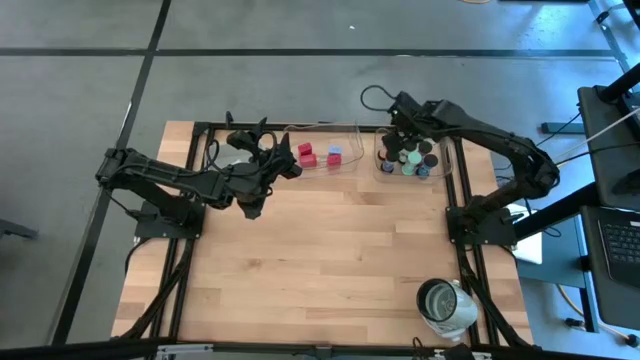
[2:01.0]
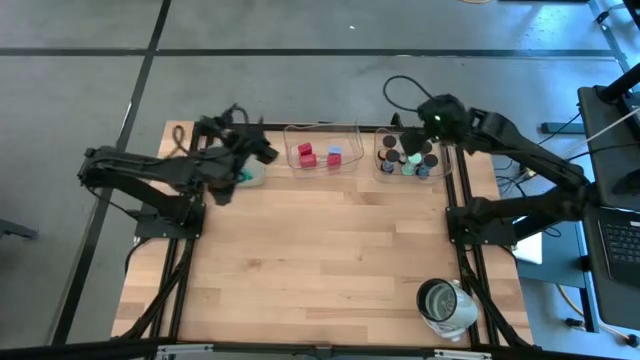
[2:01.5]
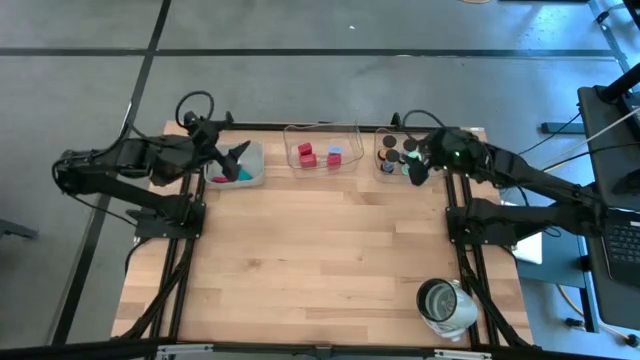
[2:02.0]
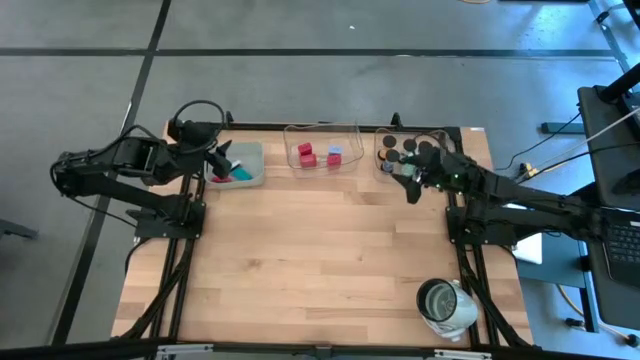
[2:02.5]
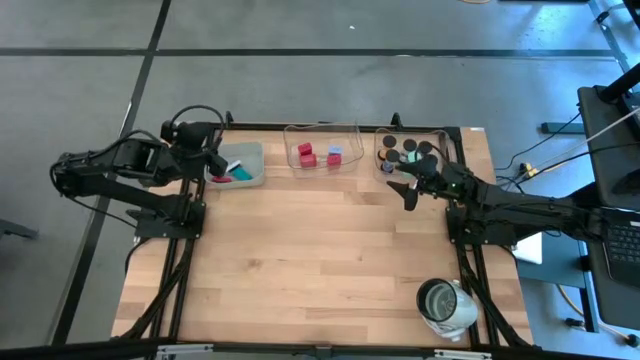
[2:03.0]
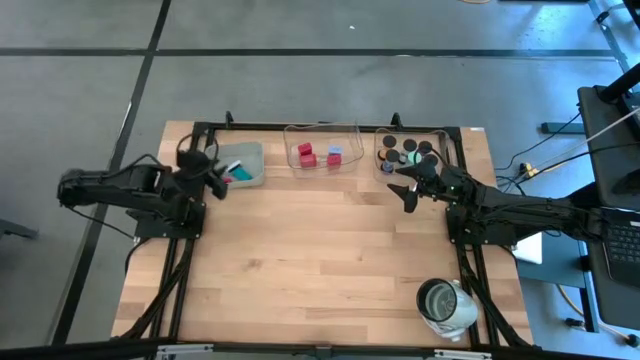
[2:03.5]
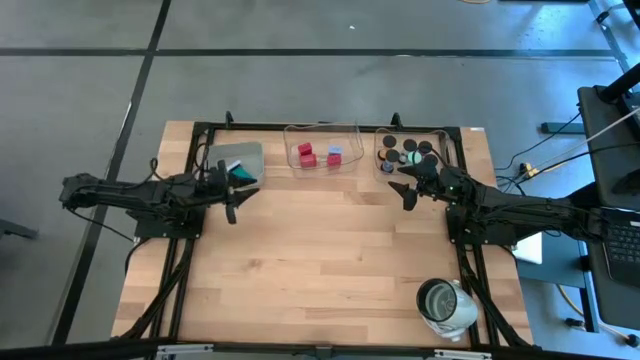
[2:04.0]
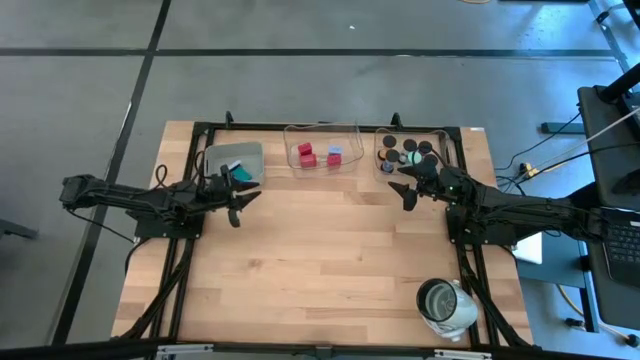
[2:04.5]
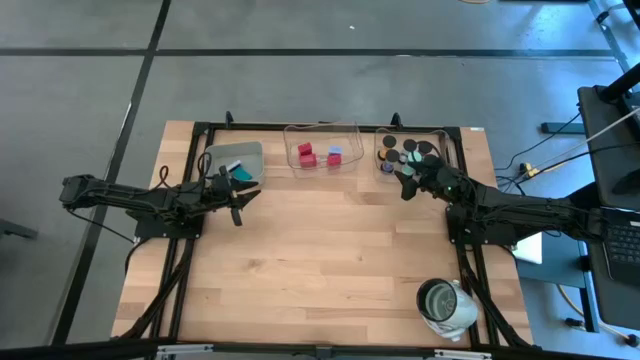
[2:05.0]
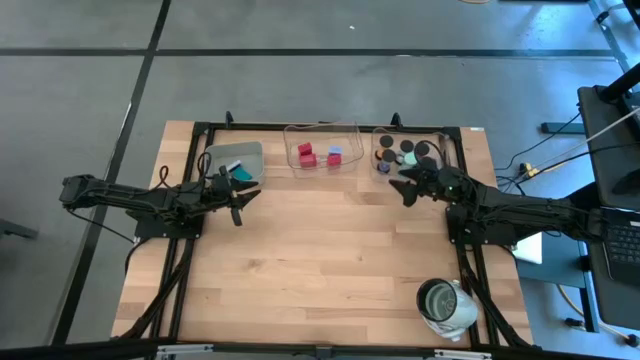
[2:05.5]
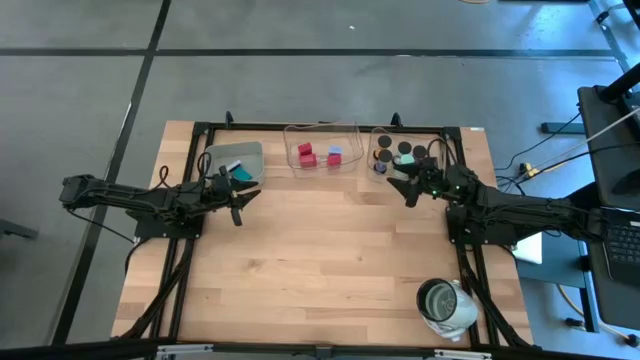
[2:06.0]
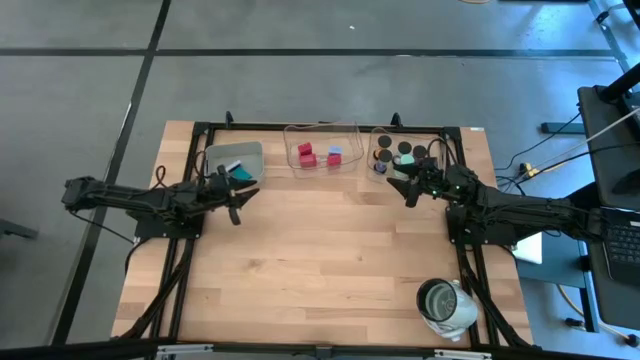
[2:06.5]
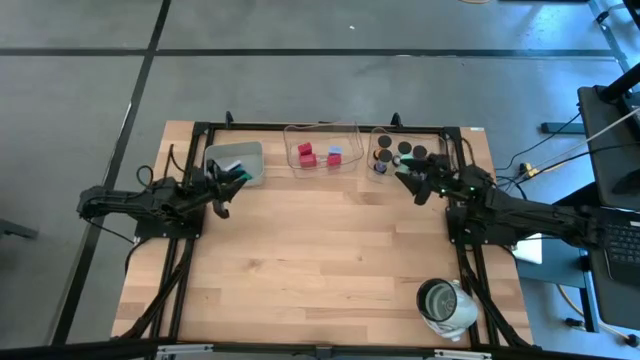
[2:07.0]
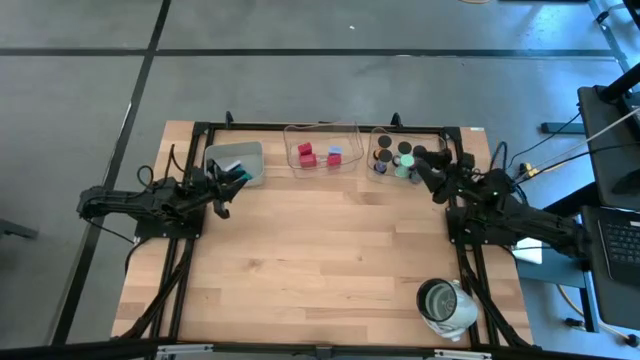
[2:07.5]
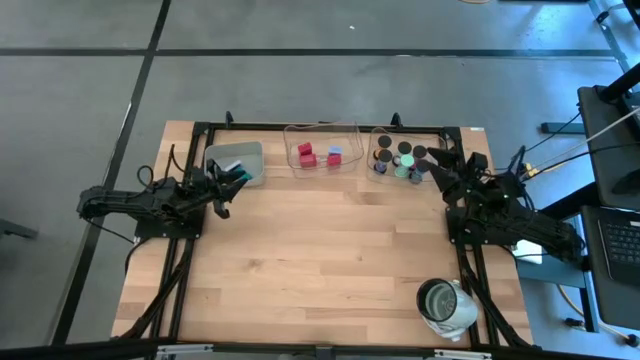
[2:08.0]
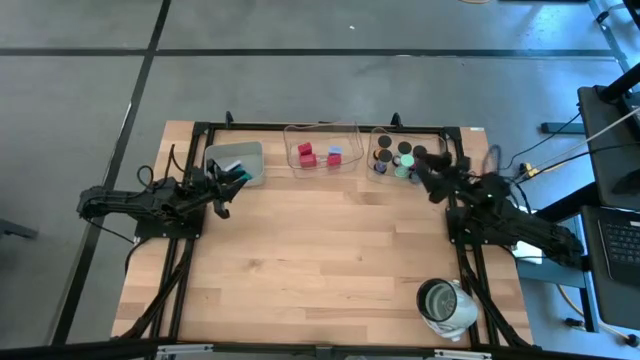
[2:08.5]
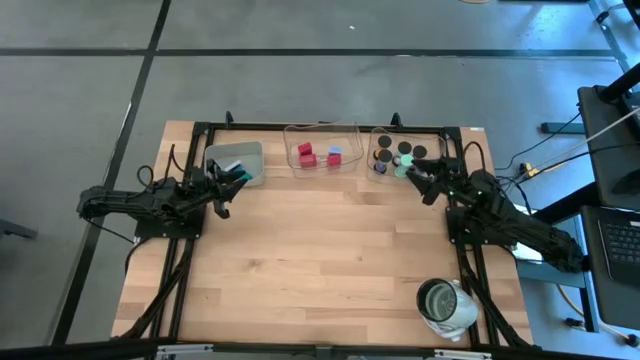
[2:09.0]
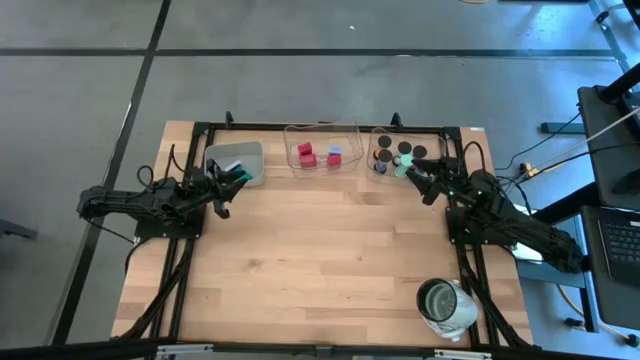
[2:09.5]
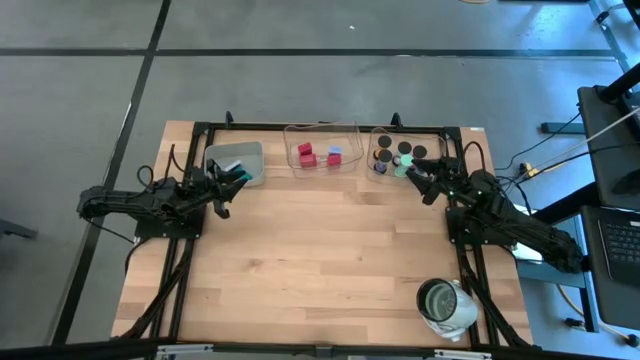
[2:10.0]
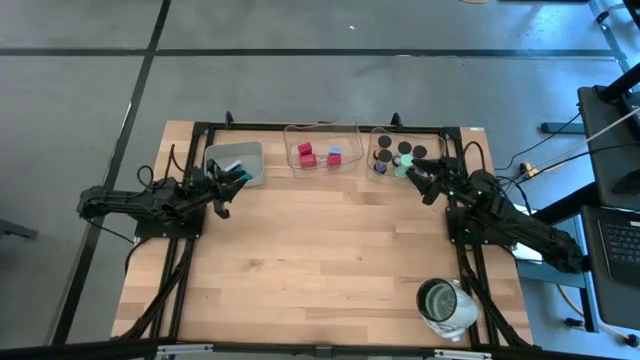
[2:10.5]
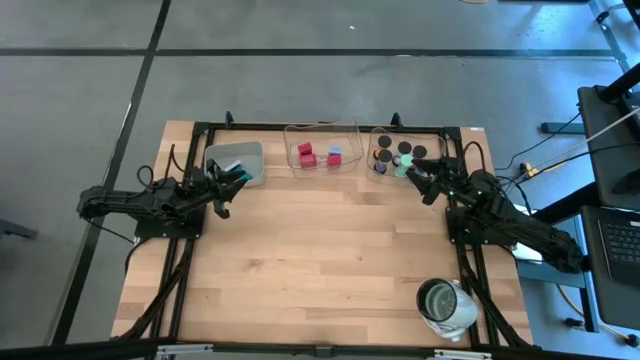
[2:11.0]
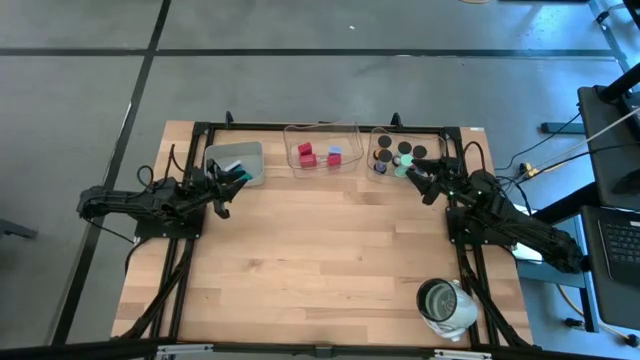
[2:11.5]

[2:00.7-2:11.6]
Task: Pick & Place Office items
Return to Home Position

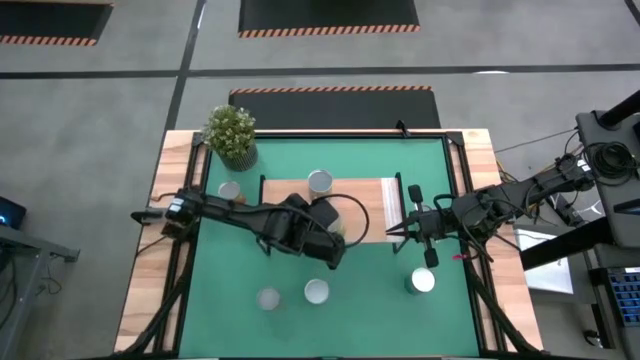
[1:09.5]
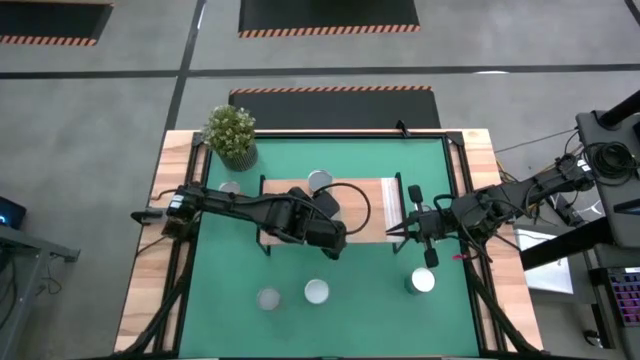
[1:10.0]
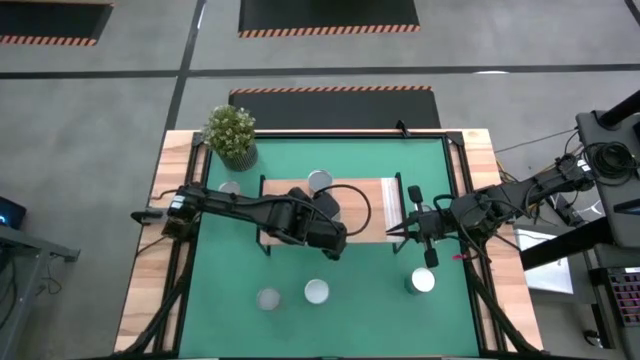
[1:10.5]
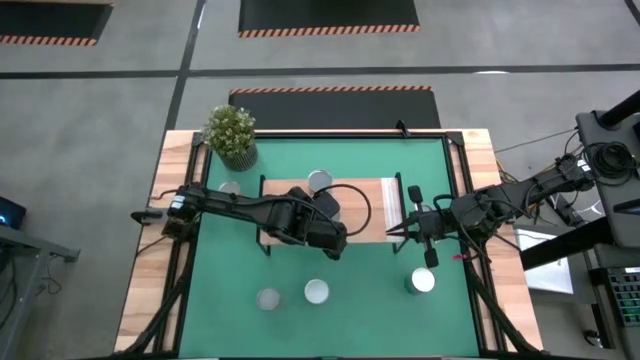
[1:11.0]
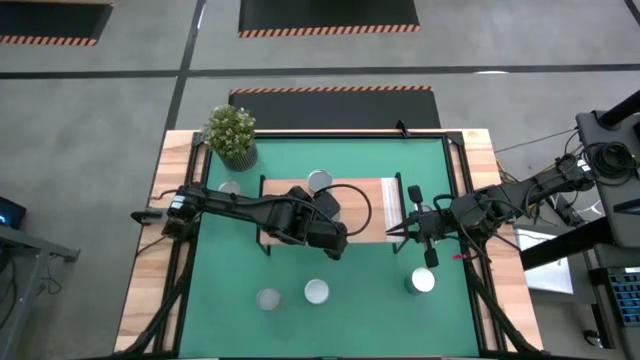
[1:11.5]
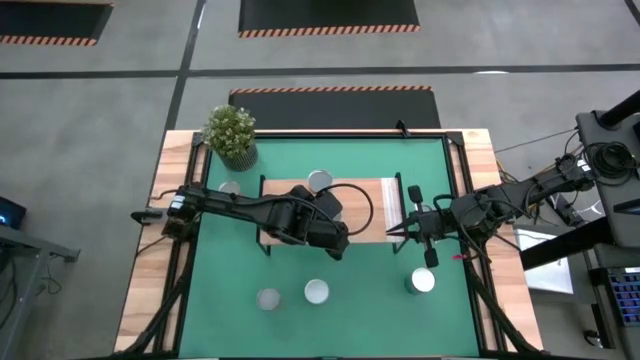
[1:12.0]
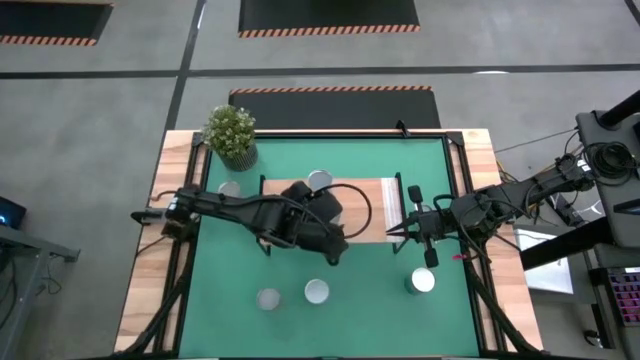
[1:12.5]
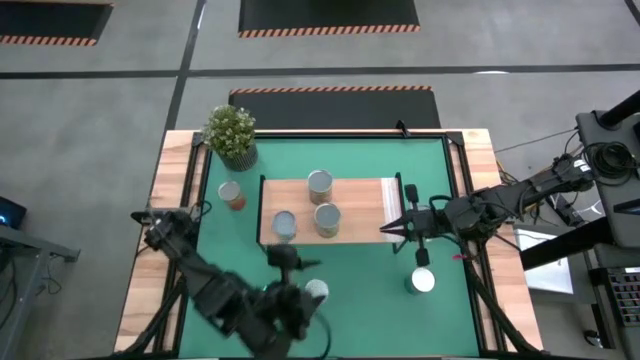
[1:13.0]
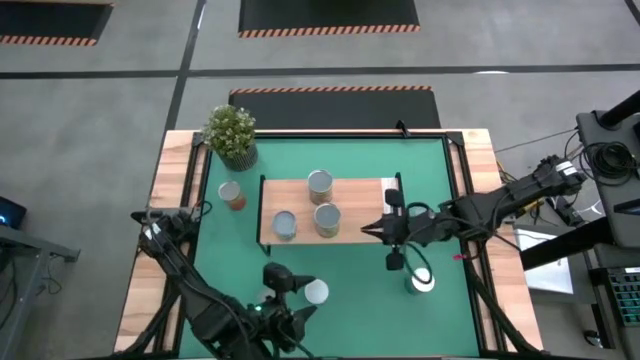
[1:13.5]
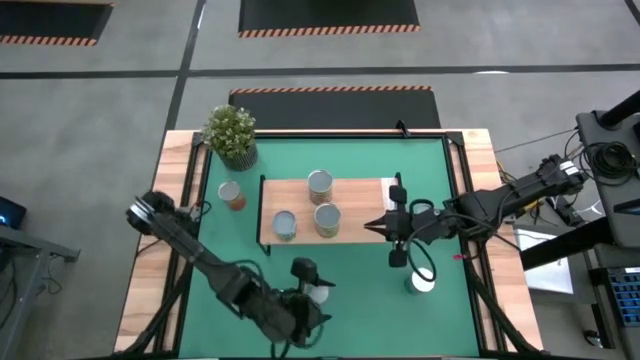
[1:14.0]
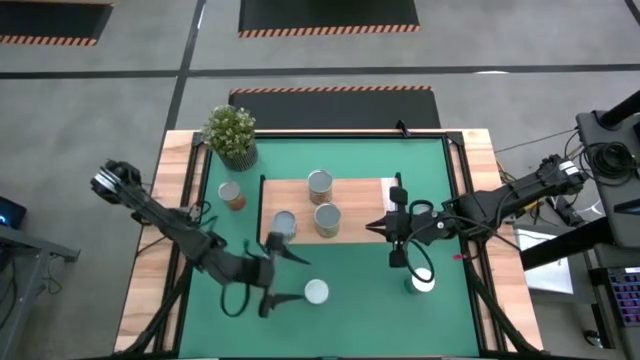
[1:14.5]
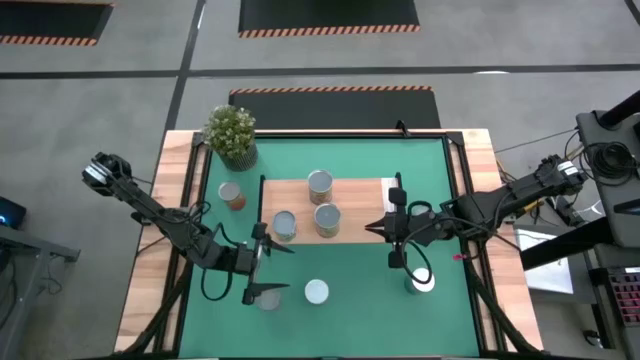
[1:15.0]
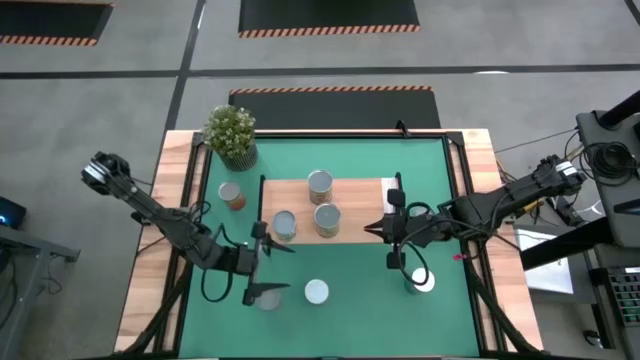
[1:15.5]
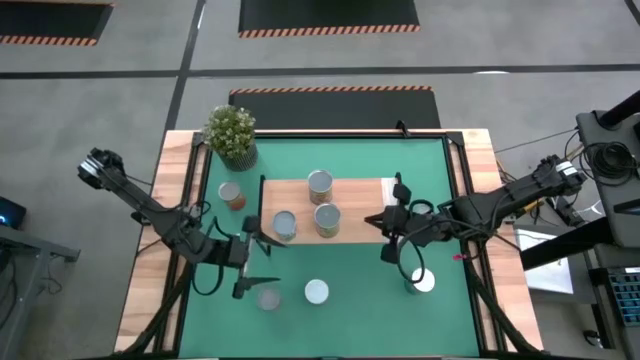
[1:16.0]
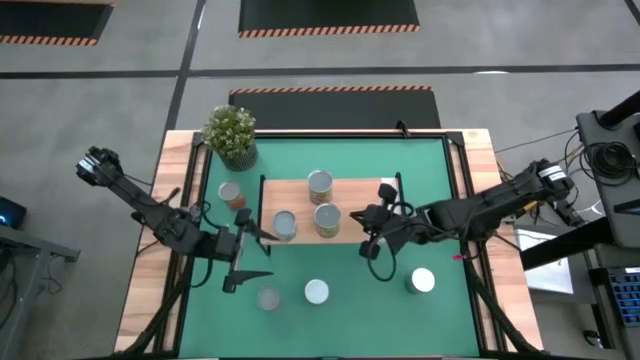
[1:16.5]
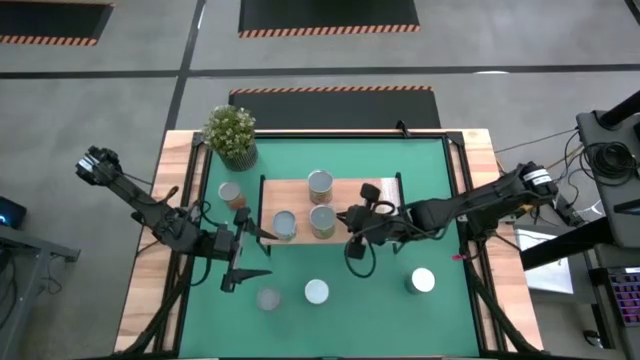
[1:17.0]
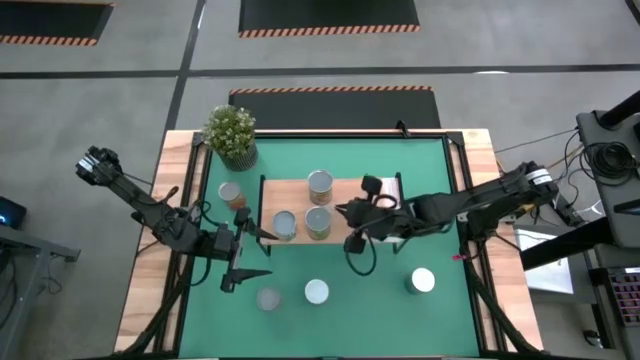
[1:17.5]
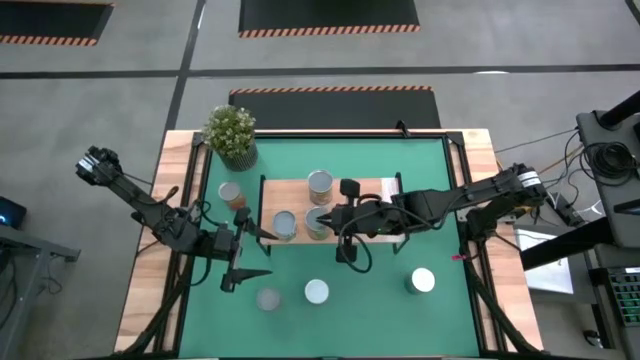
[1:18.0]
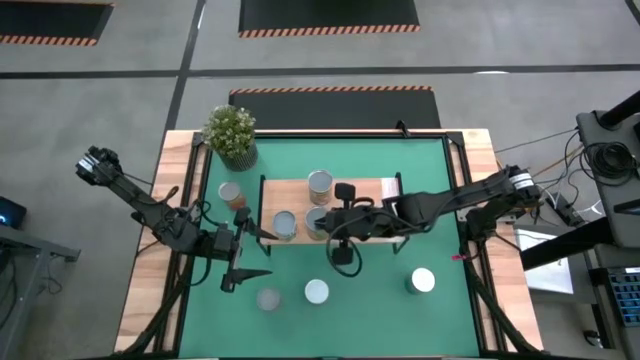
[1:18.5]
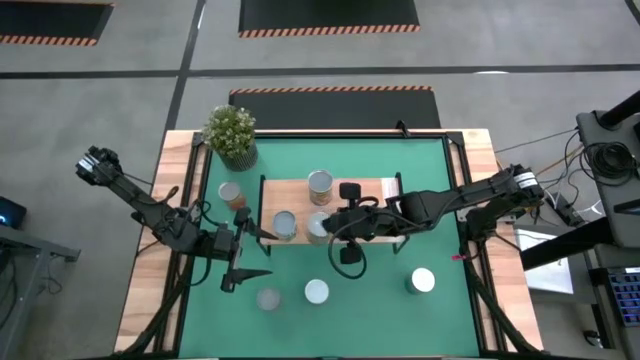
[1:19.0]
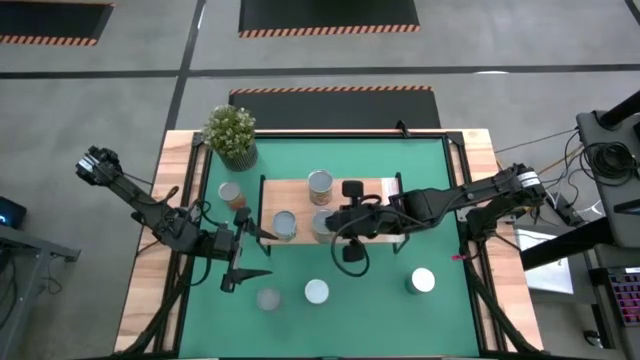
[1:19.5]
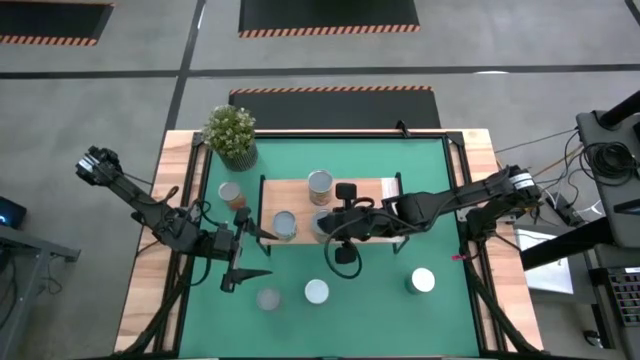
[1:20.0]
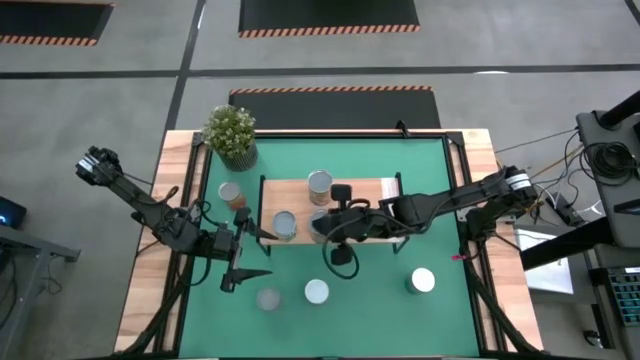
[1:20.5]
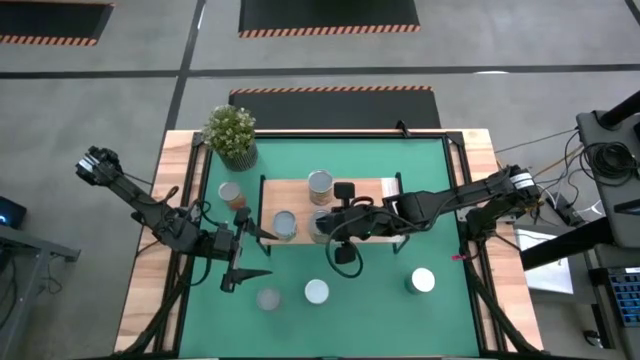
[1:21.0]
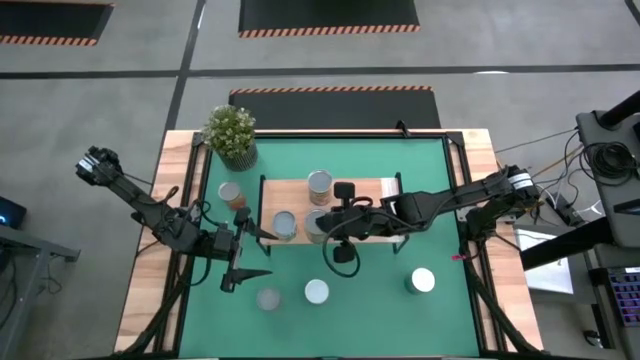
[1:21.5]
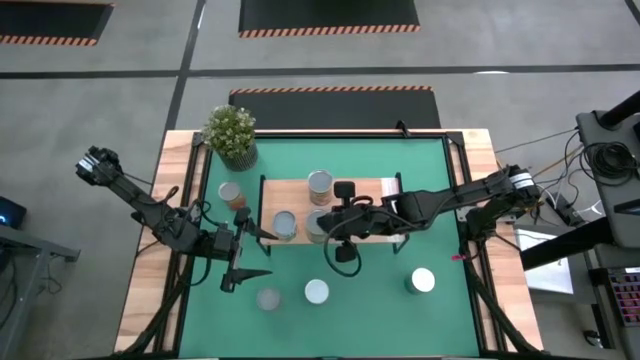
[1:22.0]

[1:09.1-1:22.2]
Task: Pick and place cans onto a shelf
Put the canned of oranges on the shelf
